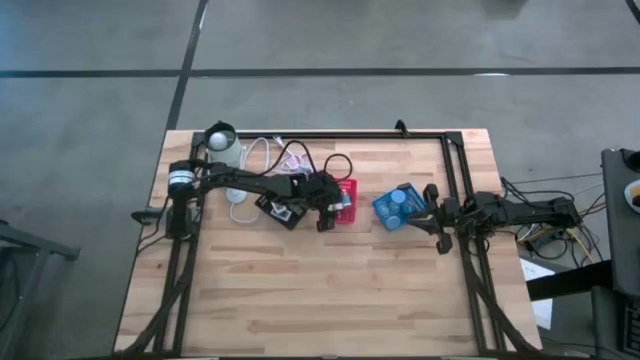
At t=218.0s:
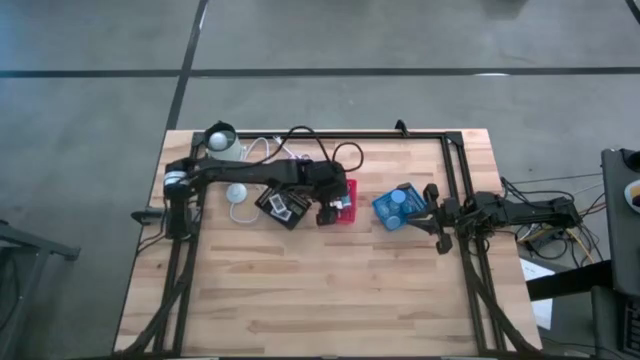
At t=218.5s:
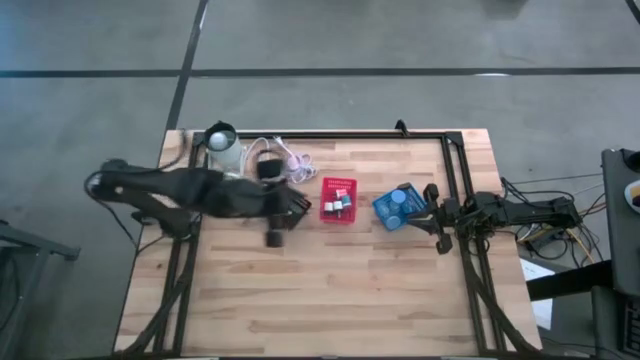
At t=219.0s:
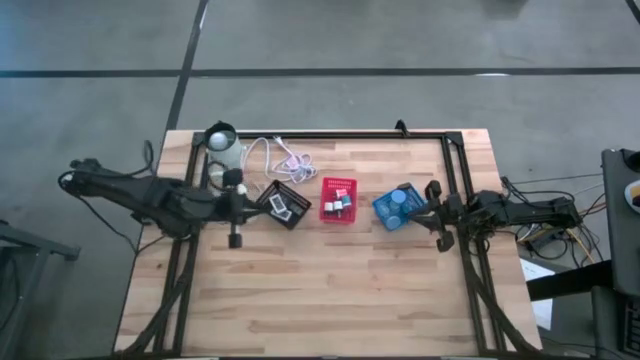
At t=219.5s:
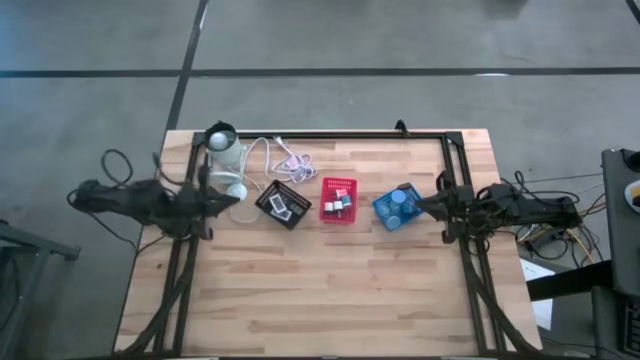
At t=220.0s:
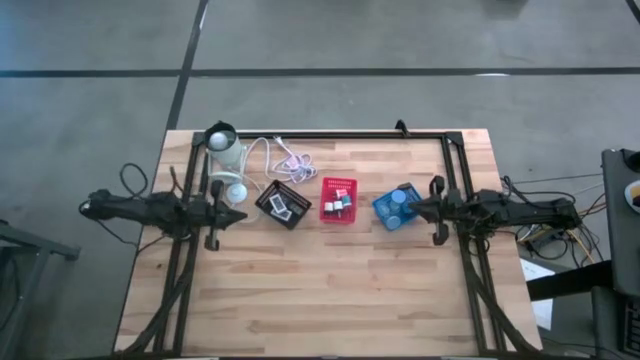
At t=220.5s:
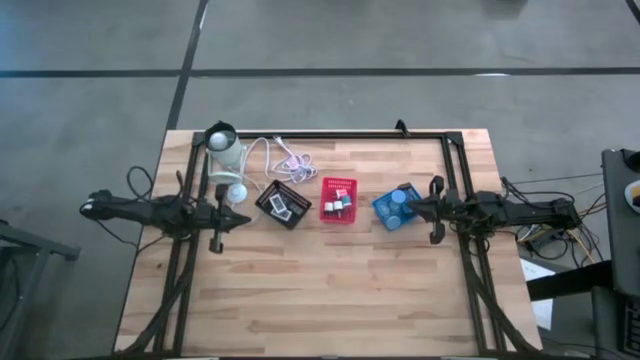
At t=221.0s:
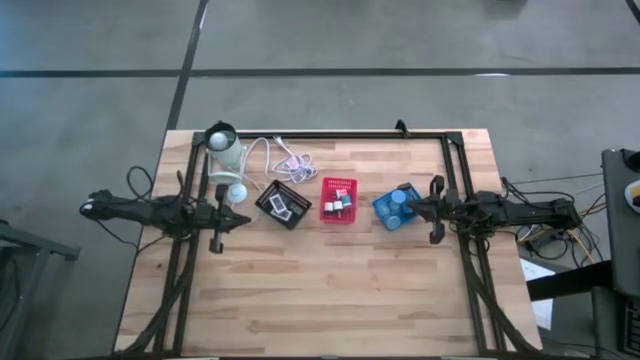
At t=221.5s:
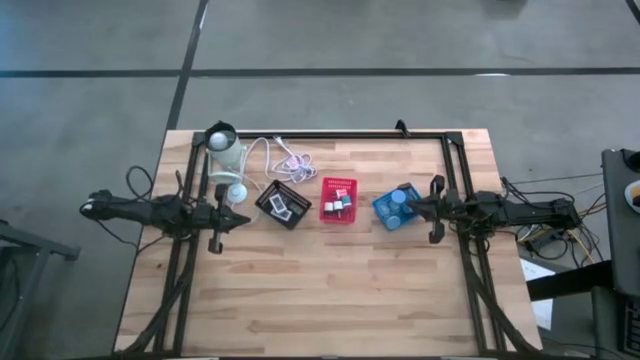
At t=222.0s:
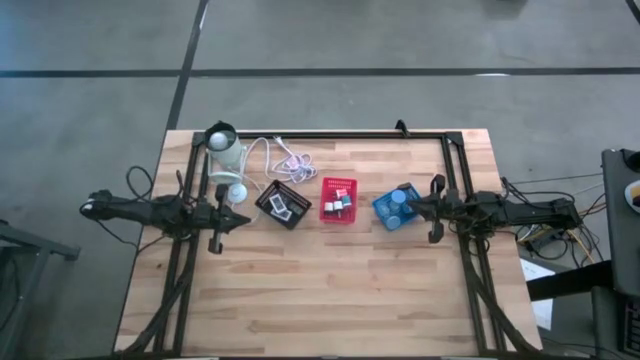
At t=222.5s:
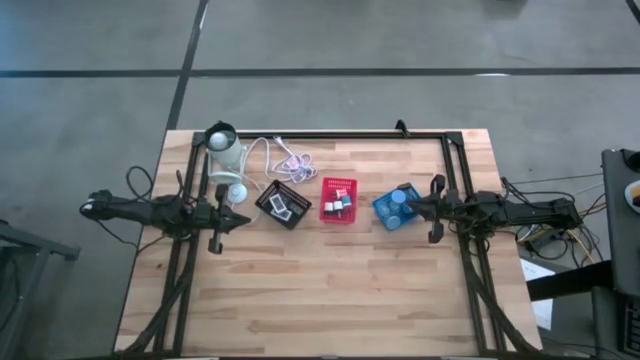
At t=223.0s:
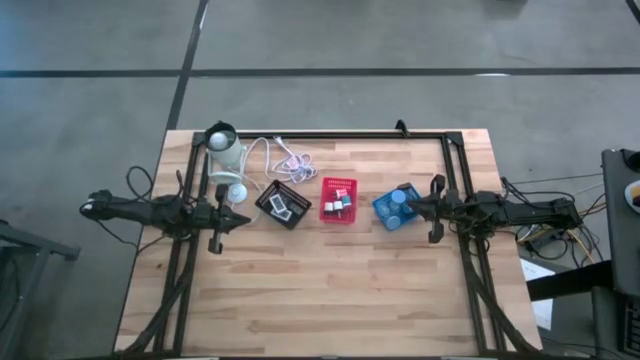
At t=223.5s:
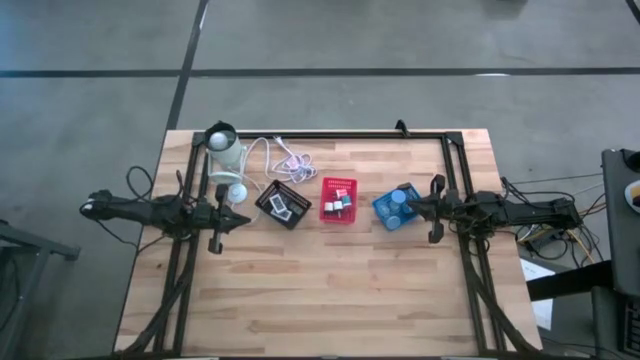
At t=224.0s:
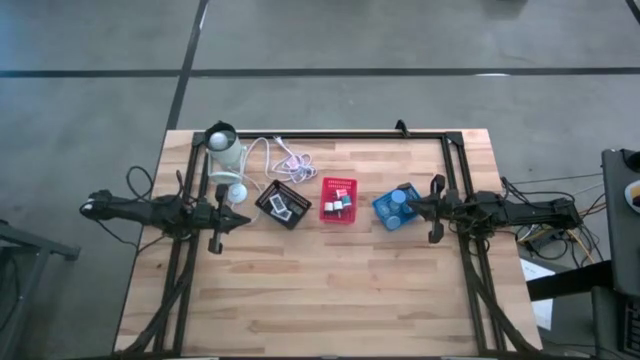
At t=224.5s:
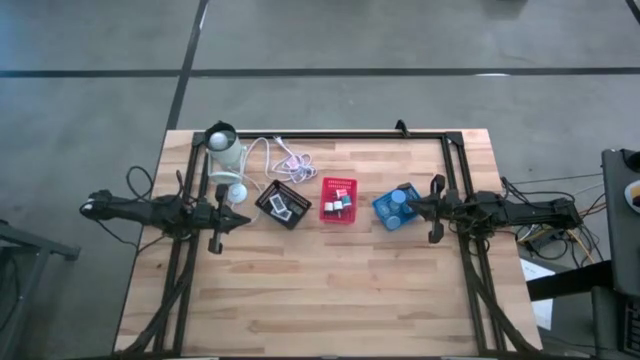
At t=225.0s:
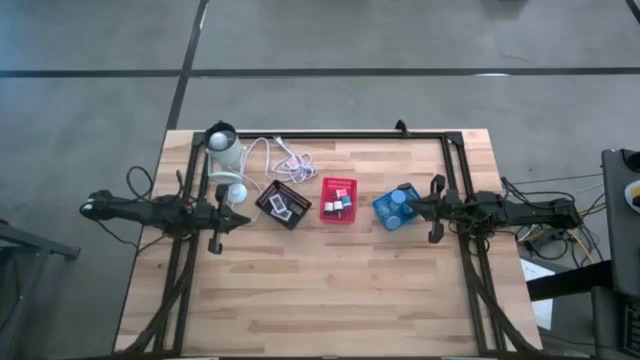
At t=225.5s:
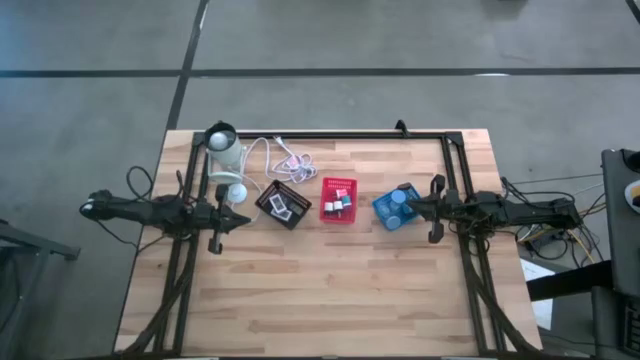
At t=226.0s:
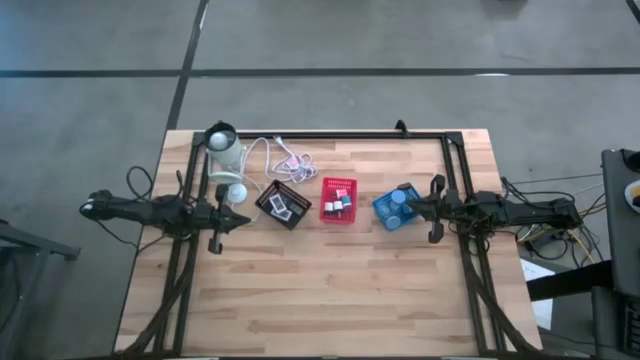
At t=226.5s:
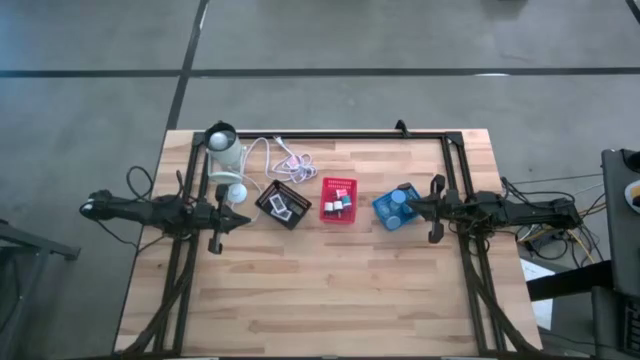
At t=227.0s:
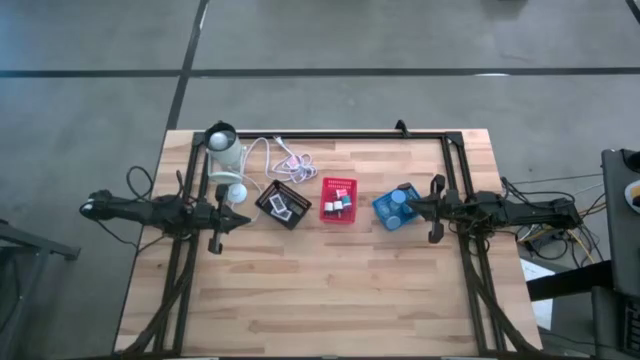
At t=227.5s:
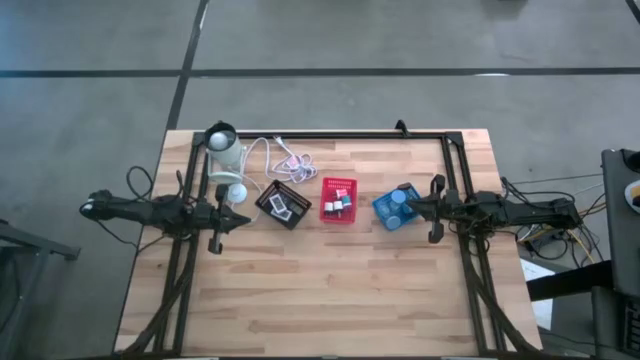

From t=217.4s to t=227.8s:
Task: Pick & Place Office items
Return to Home Position

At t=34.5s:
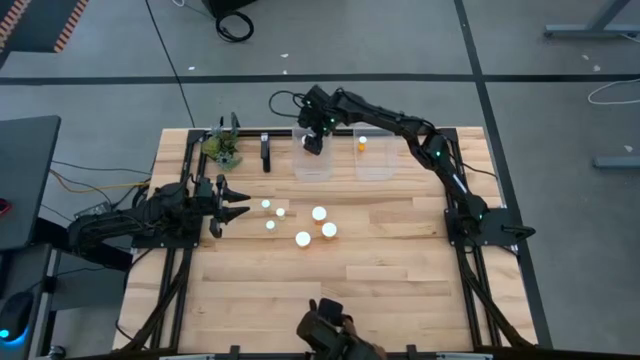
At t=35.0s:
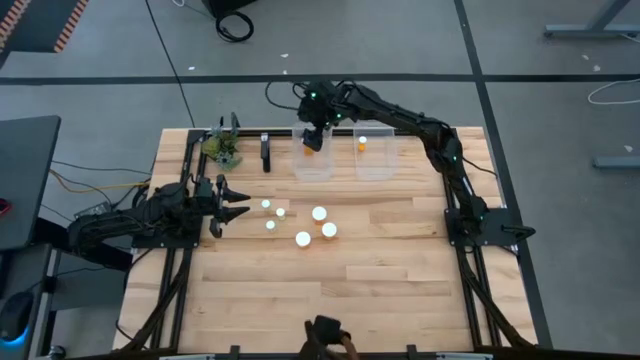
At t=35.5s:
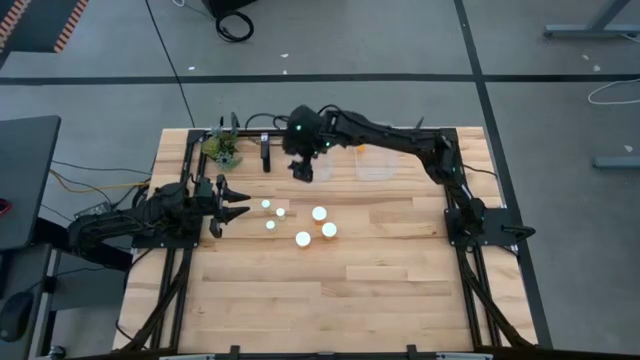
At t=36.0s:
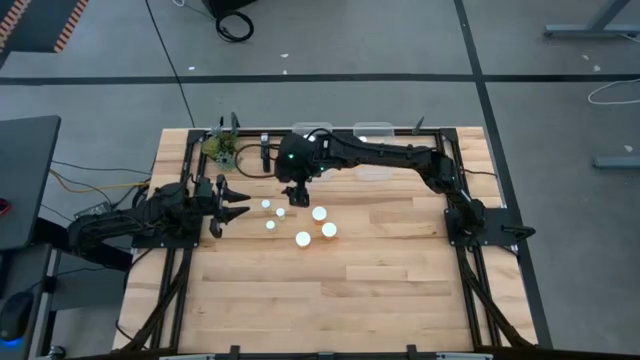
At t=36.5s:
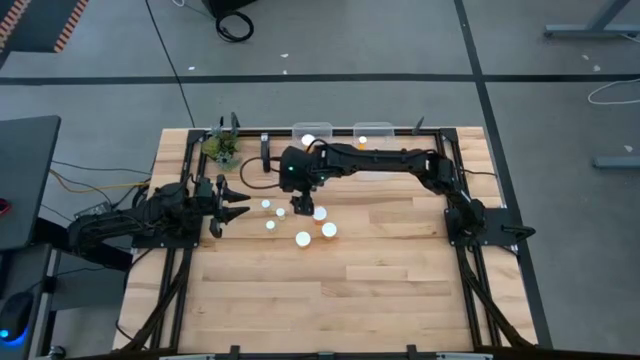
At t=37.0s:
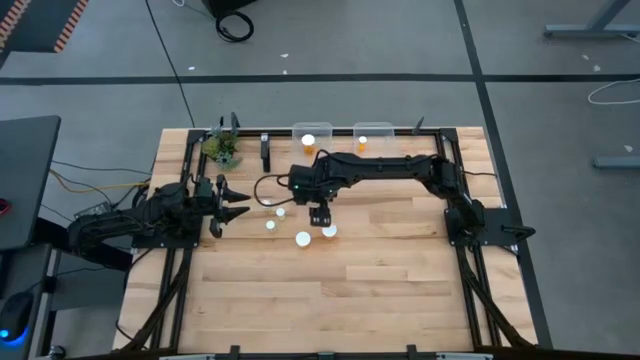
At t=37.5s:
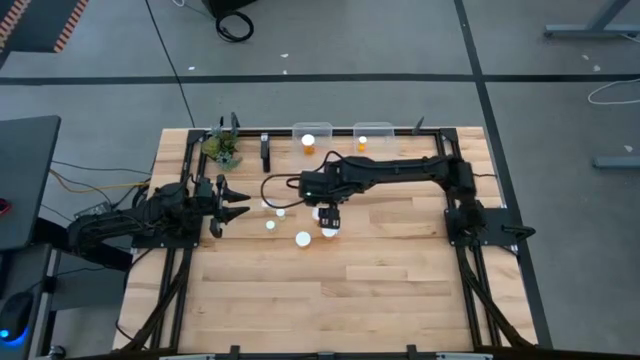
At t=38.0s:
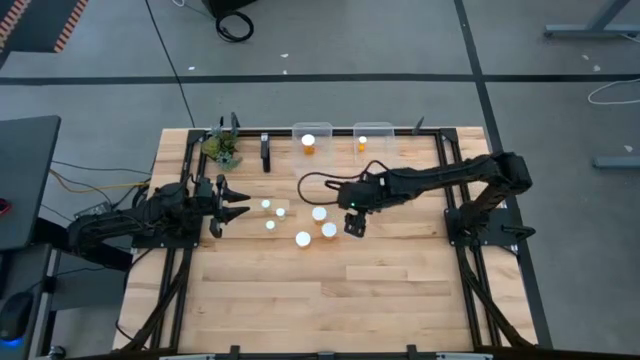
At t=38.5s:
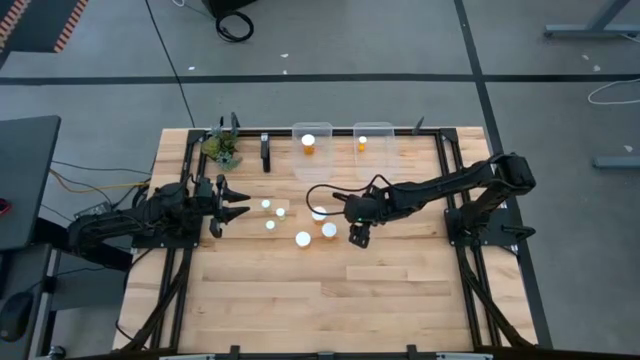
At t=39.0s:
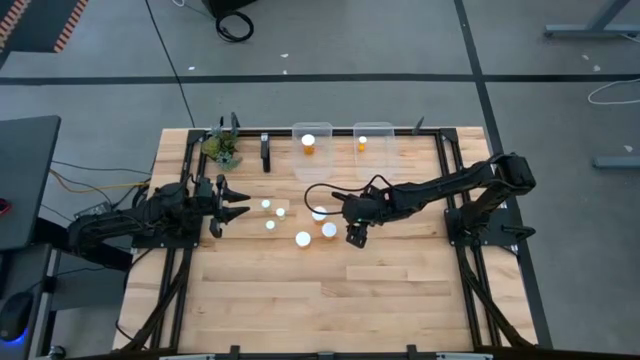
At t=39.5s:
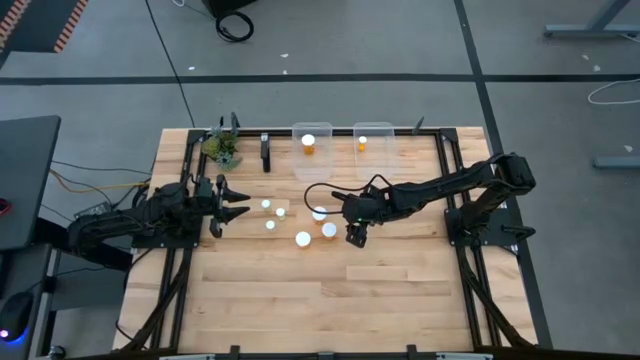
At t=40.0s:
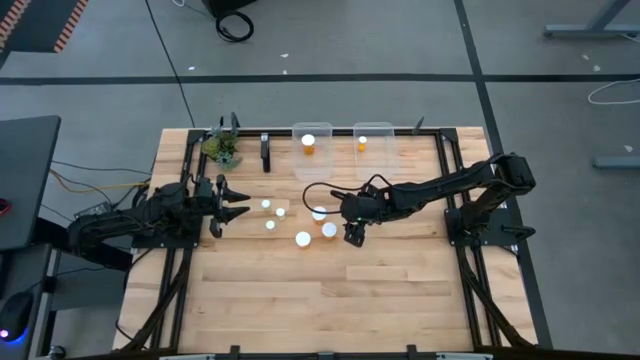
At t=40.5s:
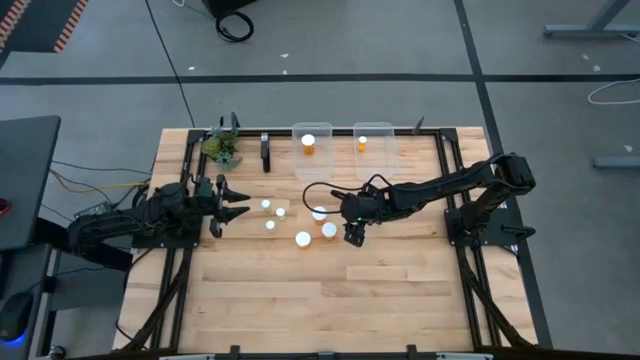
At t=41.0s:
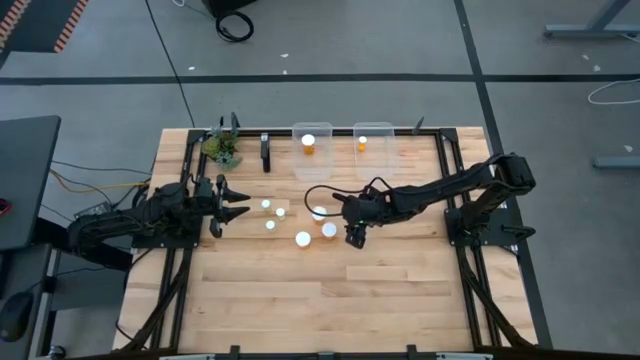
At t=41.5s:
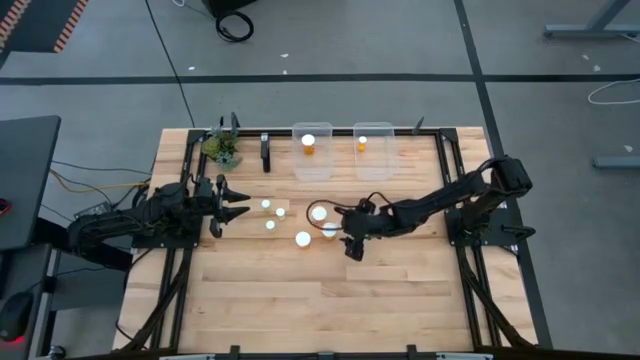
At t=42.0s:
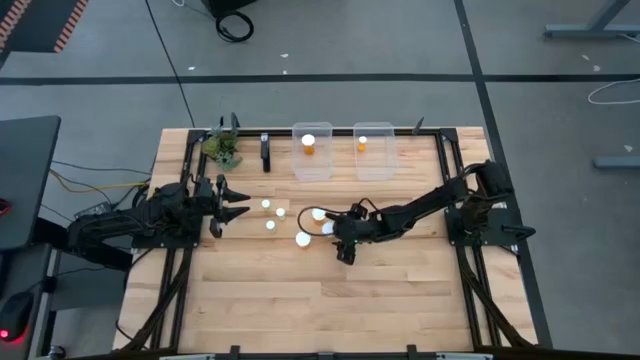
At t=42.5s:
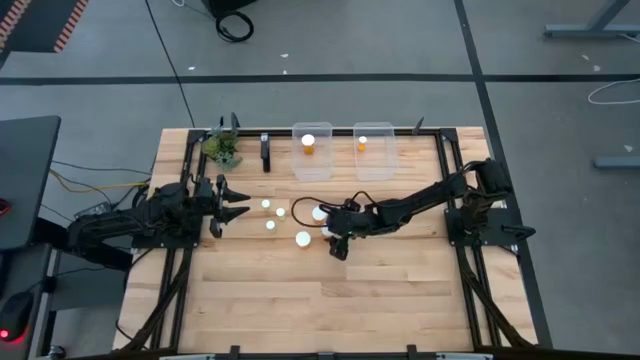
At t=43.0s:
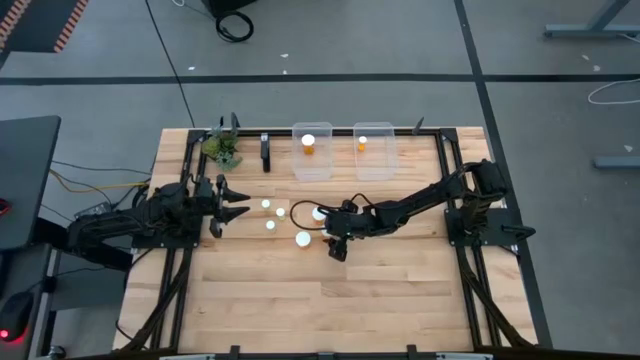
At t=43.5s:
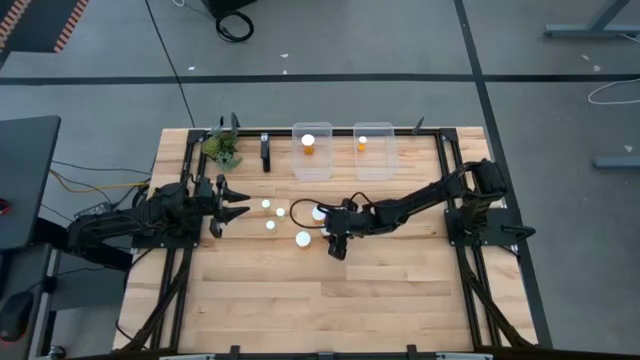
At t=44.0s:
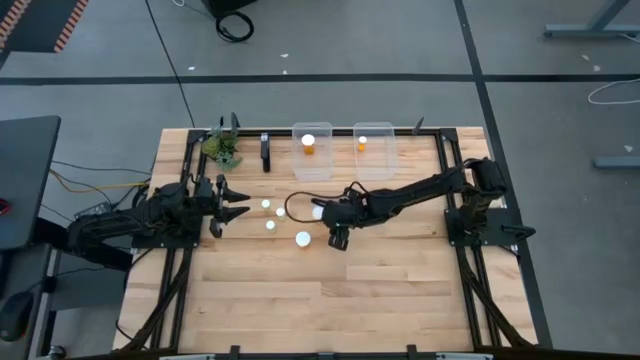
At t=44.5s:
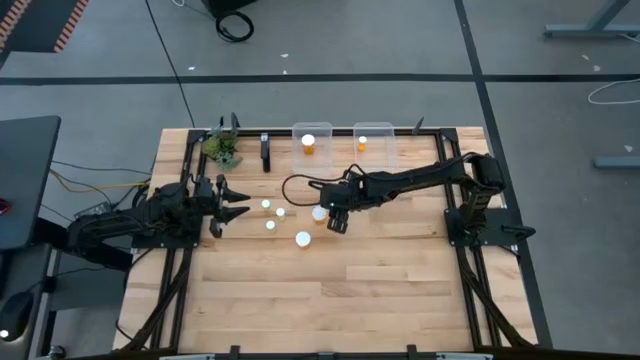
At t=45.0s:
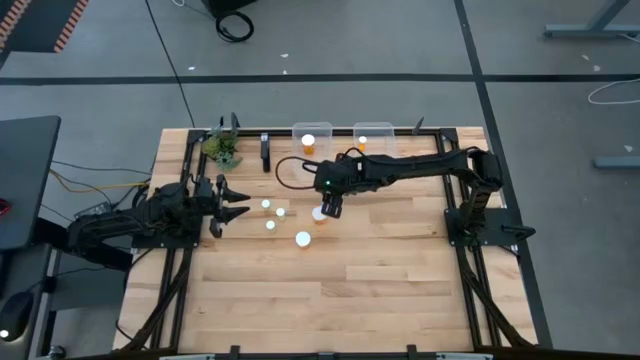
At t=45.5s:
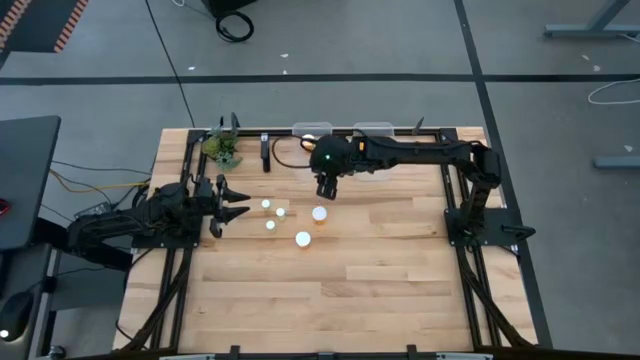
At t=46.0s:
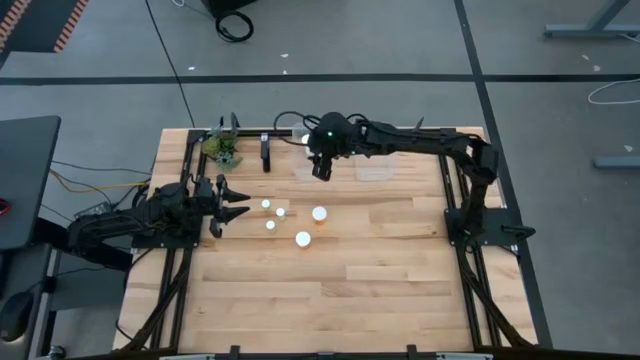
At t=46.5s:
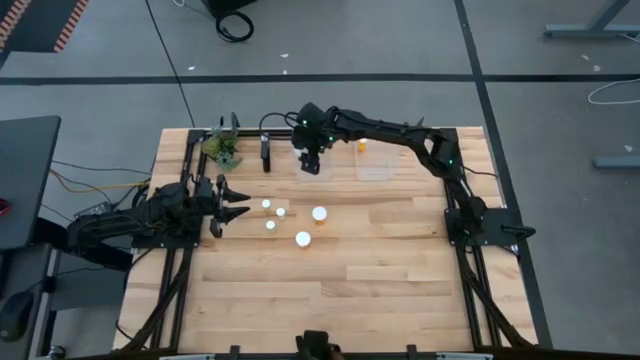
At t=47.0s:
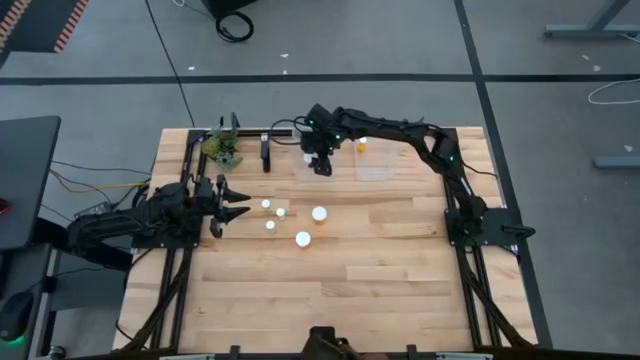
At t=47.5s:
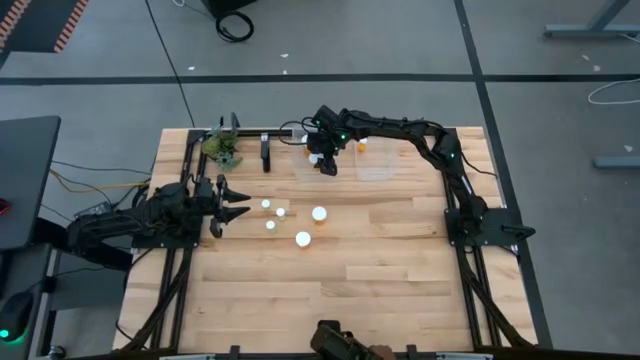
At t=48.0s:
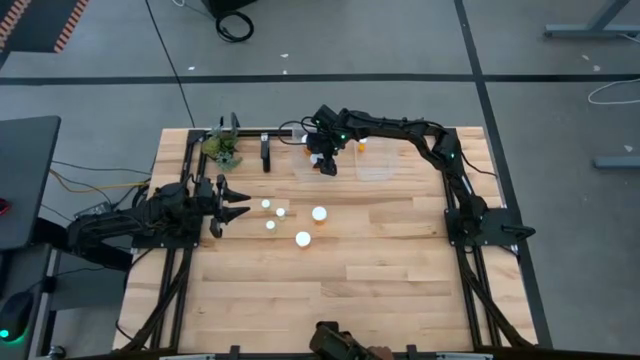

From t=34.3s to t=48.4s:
Task: Pick and place medicine bottles into bin by pill shape (circle, oval)
Put the large orange pill bottle into the left transparent bin
